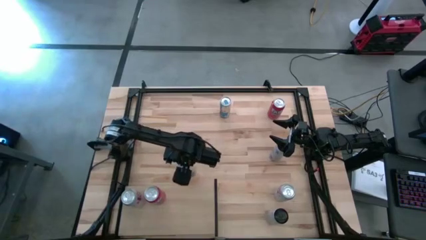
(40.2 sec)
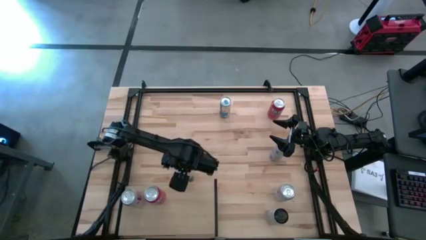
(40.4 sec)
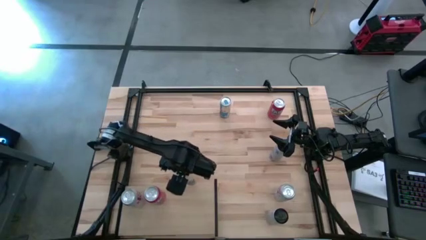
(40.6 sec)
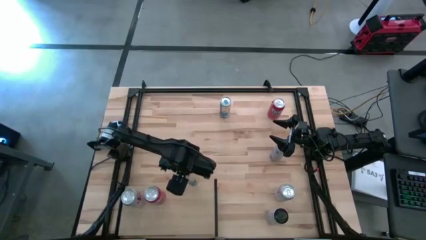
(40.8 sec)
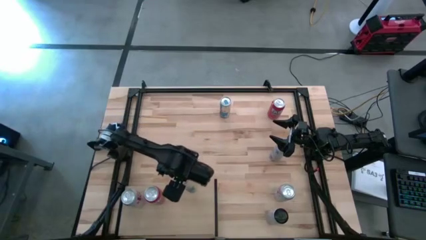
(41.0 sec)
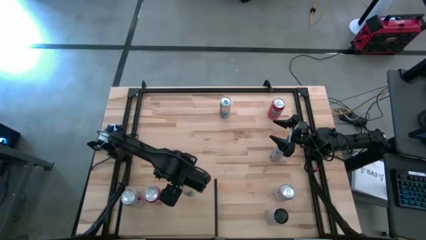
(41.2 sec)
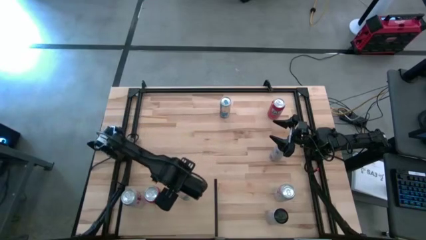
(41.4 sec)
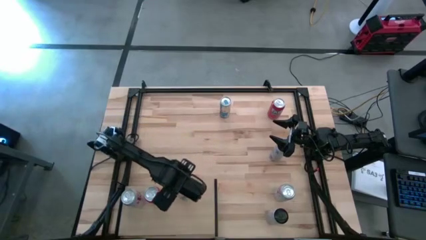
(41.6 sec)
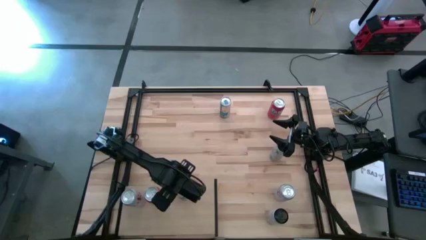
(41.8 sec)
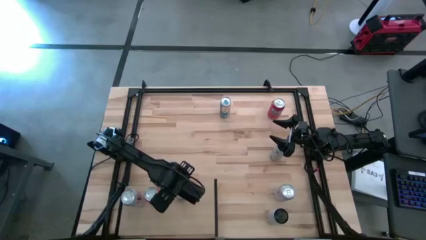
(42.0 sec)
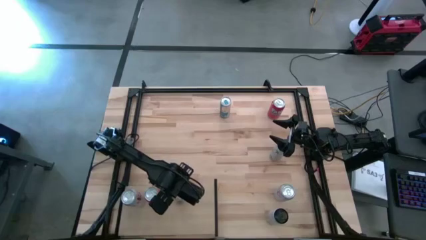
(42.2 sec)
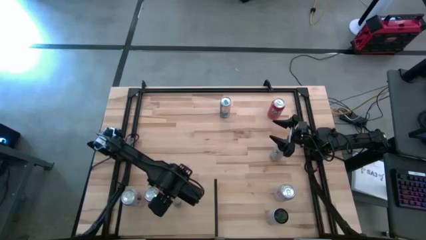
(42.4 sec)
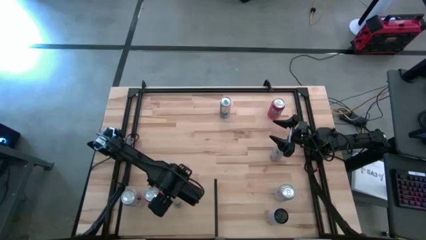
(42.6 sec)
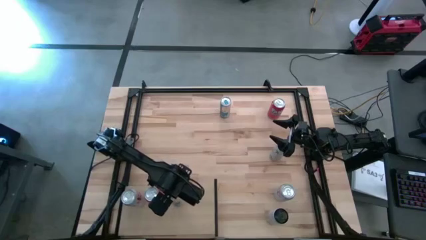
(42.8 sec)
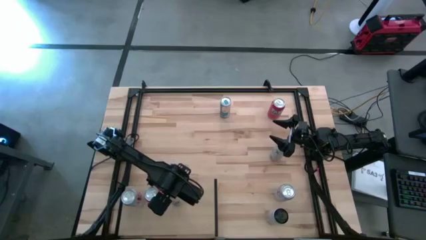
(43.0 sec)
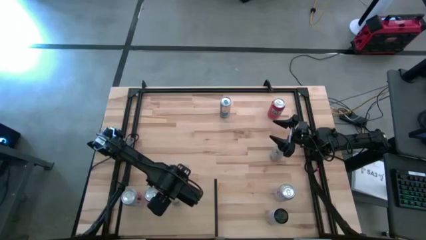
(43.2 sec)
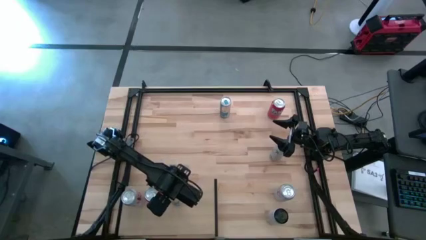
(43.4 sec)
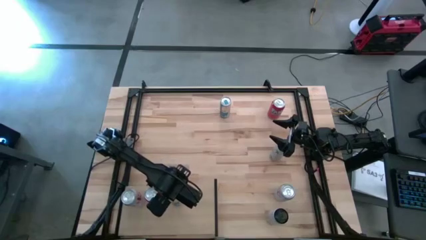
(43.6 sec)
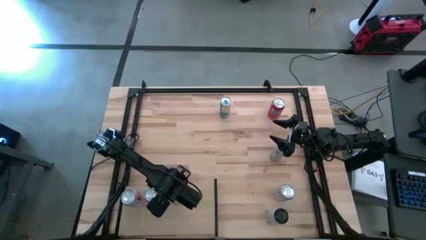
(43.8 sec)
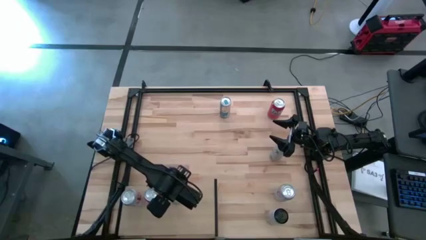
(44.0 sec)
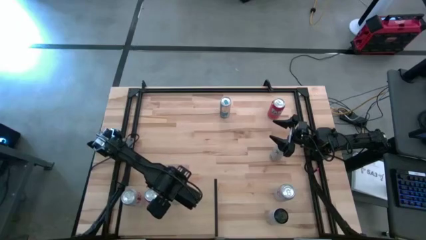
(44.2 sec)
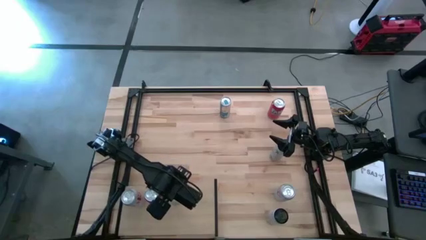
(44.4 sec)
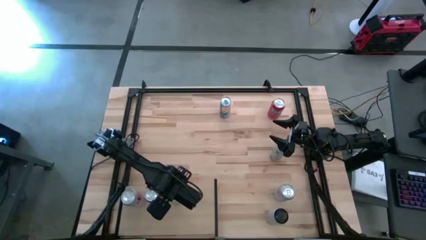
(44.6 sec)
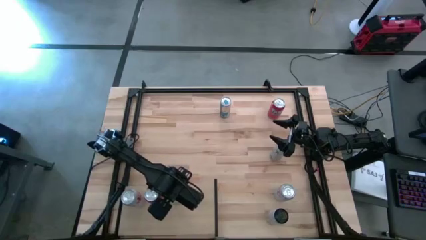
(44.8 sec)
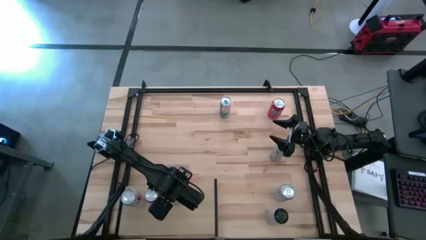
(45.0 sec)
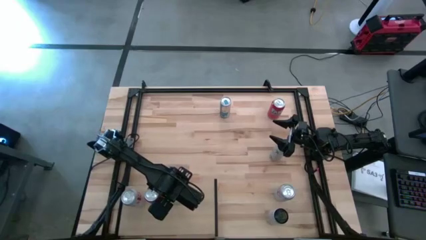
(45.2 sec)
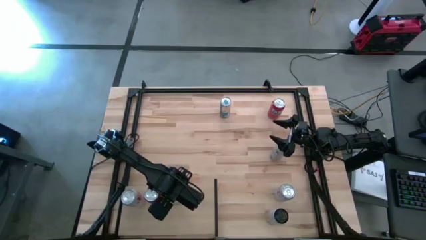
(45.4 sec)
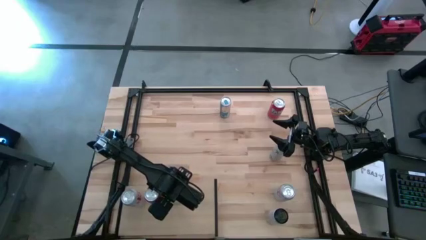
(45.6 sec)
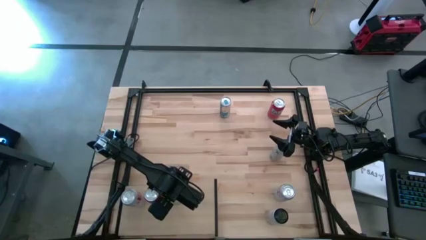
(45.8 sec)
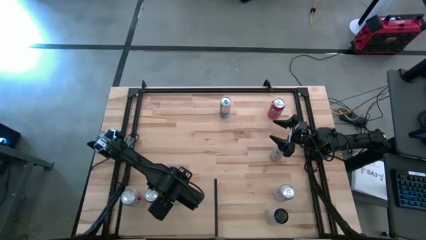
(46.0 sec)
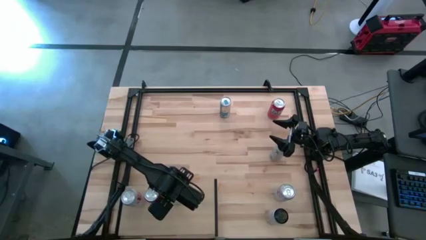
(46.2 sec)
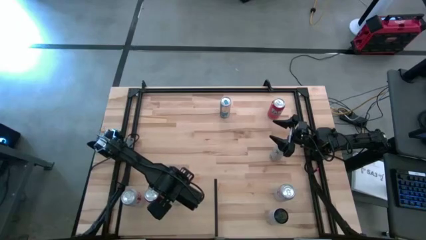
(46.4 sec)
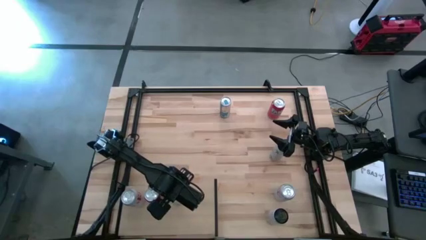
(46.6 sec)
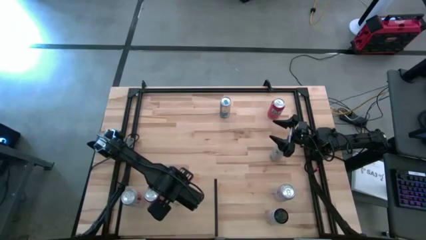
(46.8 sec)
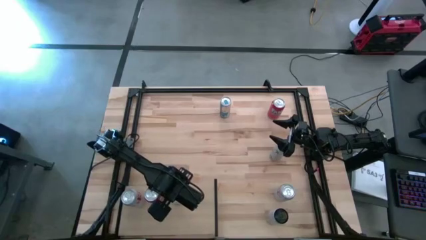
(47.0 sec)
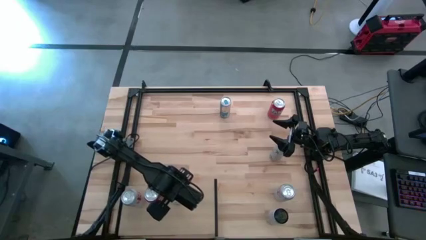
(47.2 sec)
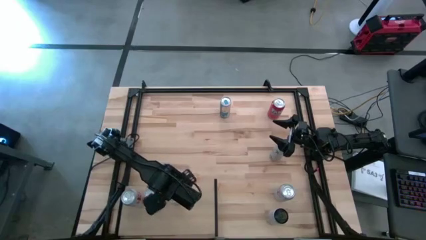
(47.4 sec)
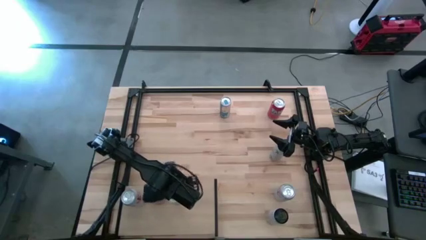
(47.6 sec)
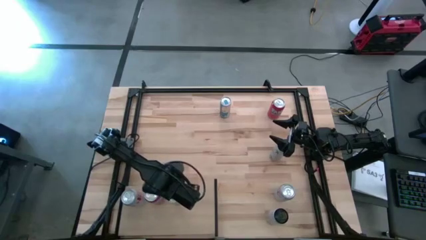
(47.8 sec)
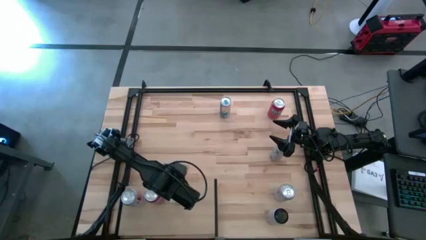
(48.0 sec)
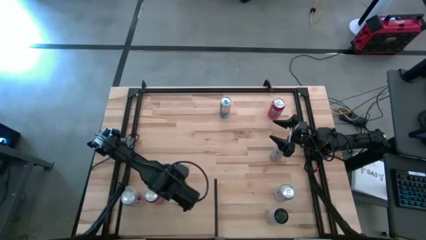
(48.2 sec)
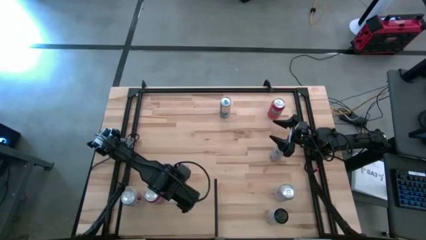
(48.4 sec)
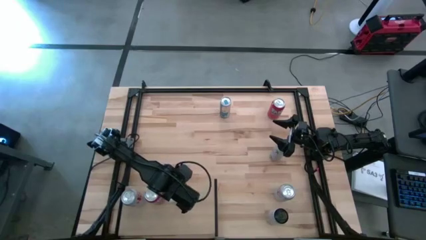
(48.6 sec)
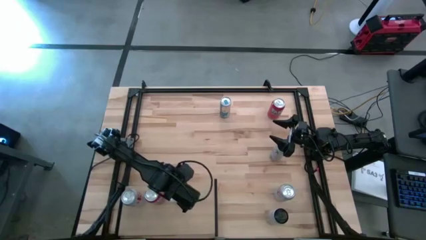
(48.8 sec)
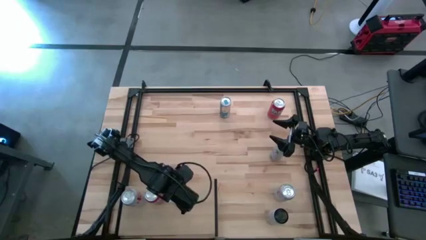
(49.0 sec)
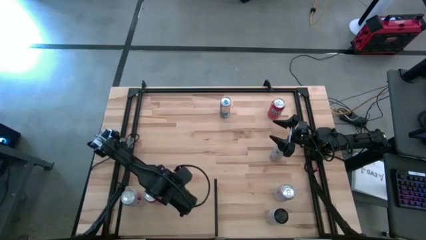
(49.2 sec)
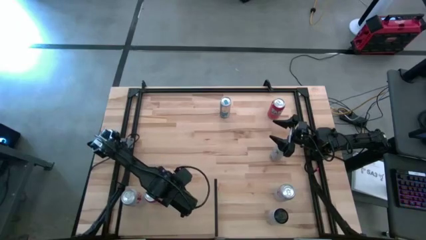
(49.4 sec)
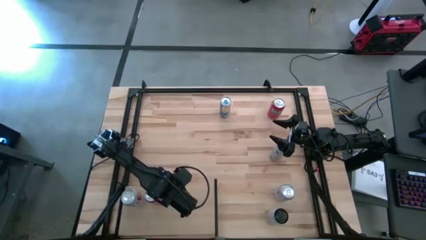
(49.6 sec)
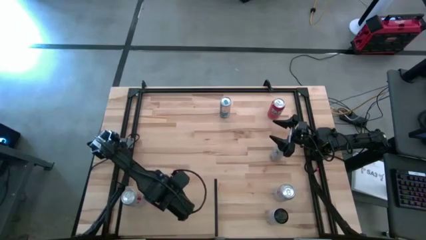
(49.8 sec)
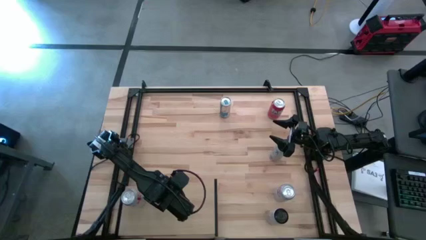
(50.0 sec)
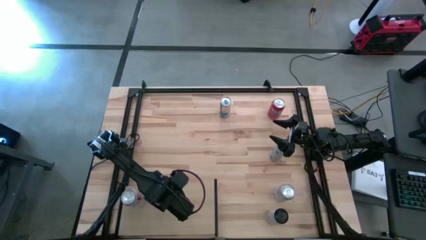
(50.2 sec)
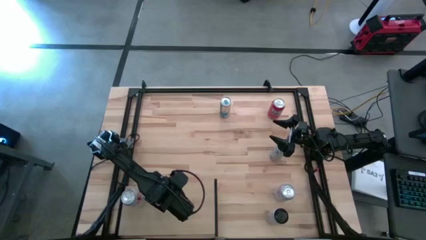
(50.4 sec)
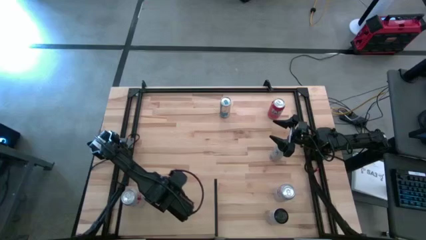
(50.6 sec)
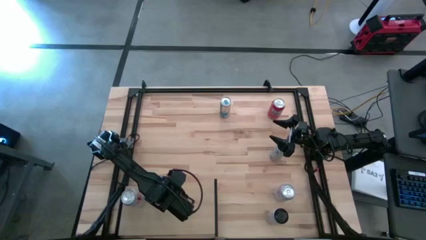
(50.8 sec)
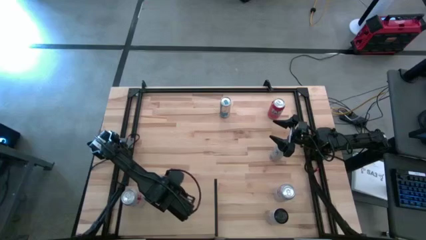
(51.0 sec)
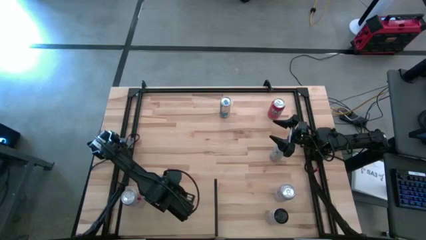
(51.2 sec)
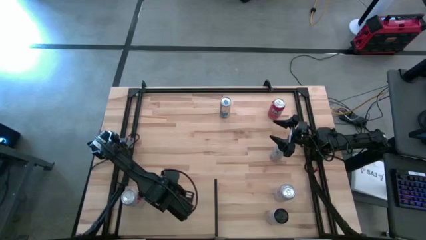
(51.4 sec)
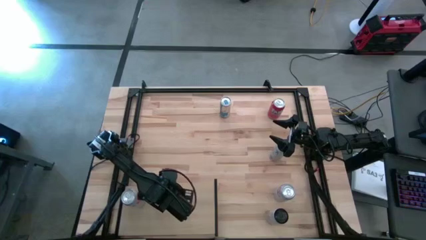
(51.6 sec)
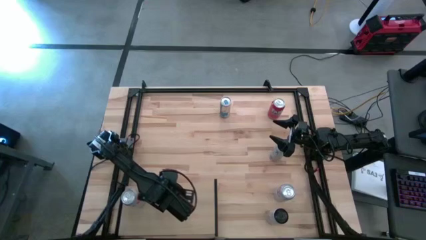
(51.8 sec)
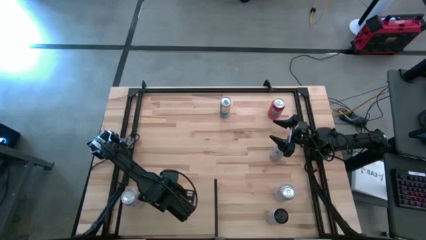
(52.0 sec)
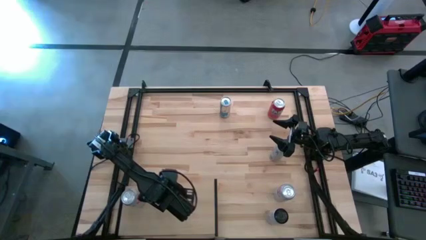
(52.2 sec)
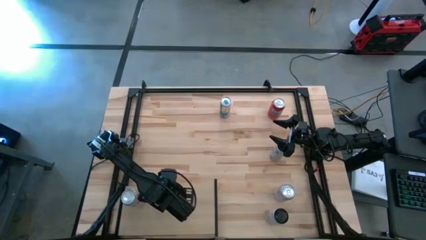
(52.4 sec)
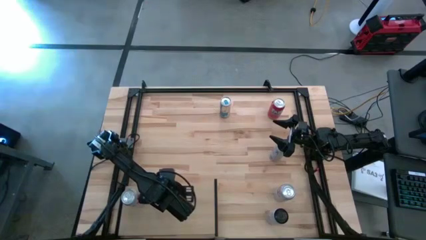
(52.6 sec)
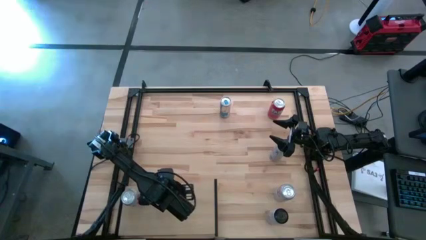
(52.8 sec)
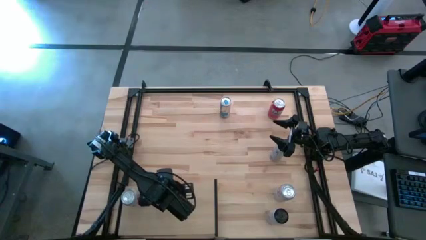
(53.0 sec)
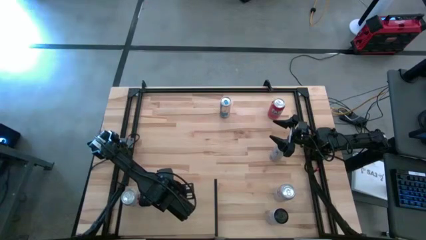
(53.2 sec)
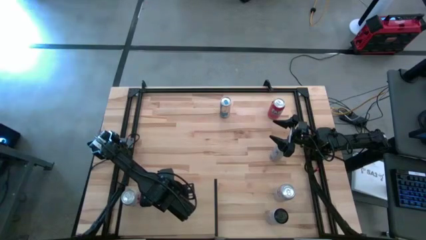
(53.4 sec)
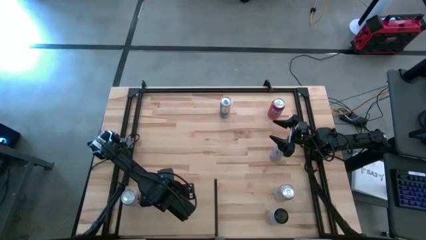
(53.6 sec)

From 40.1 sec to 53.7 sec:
Task: Place canned beverage on shelf
Put the bottom blue soda can on the shelf

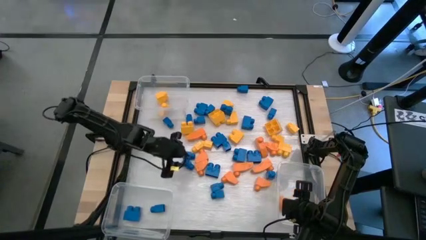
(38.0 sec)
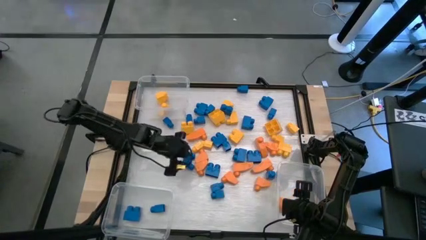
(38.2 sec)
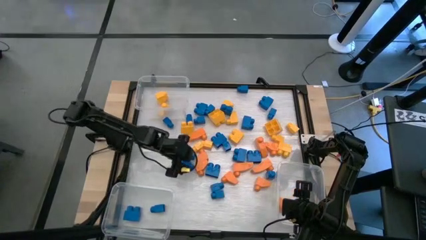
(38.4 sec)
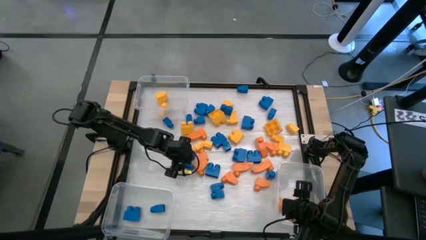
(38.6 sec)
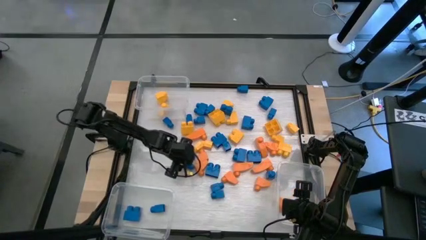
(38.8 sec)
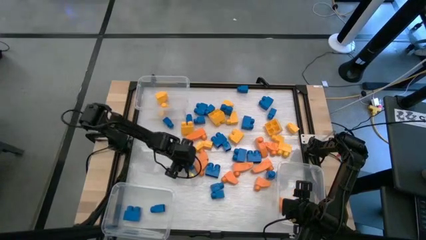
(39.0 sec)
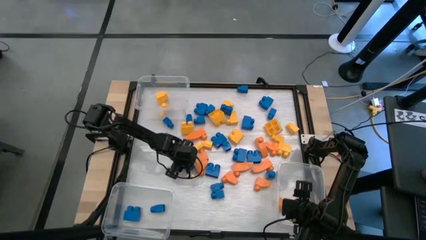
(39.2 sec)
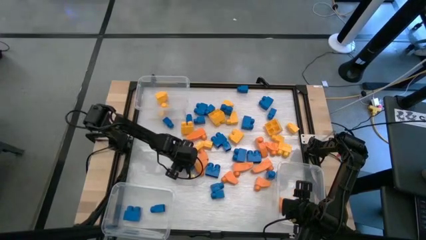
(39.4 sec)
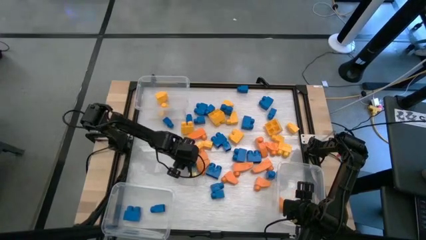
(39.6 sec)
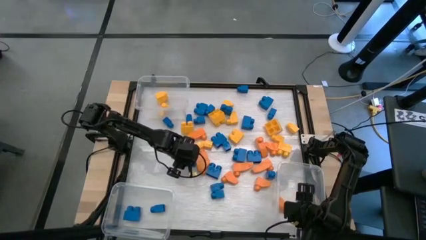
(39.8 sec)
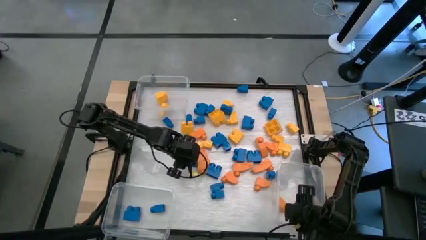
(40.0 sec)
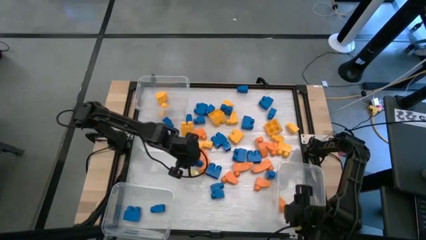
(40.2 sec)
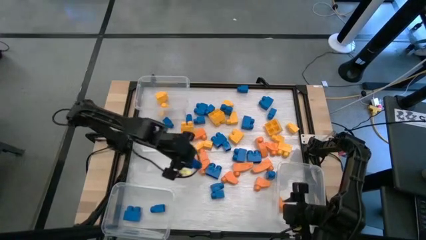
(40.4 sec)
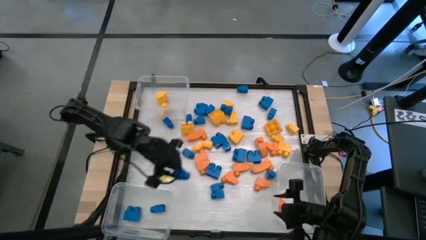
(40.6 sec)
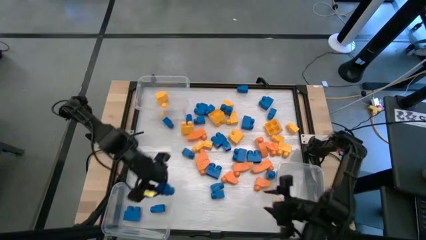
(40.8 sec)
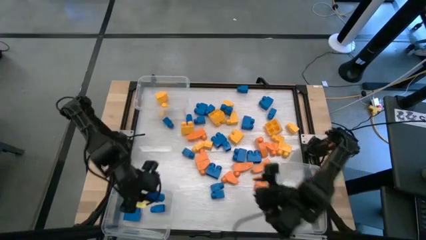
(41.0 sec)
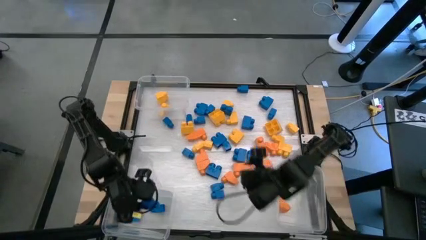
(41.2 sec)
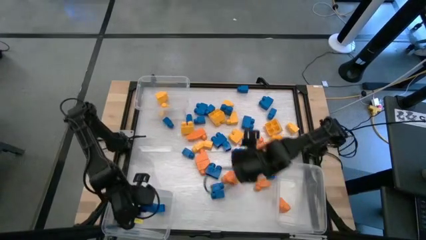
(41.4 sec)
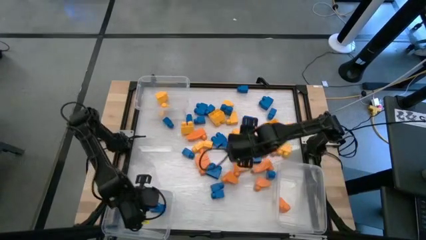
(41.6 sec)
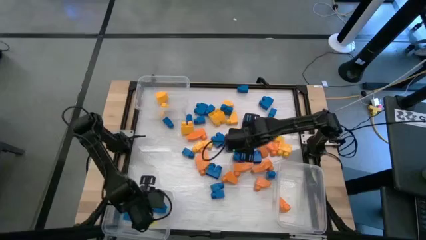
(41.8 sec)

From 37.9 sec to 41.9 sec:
Task: Sort blocks
Put the blue game piece into the bottom left transparent bin
